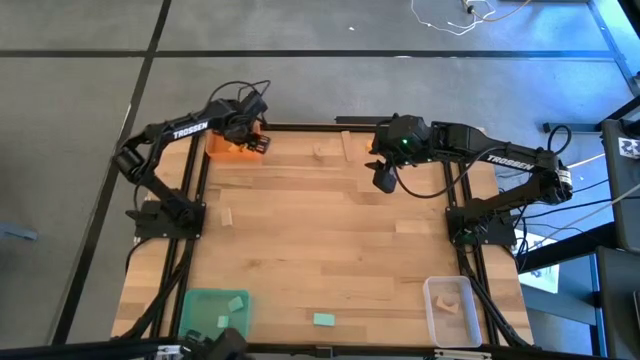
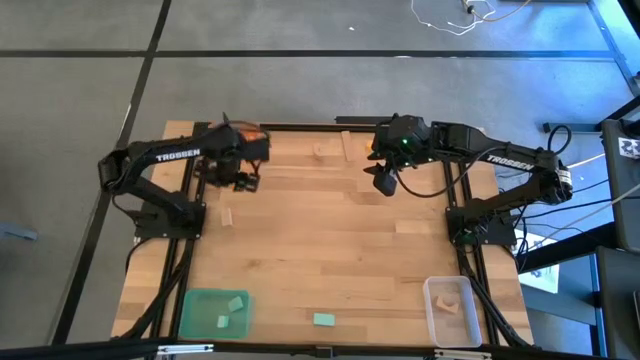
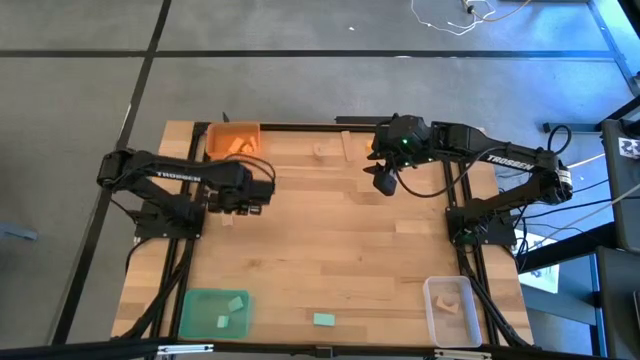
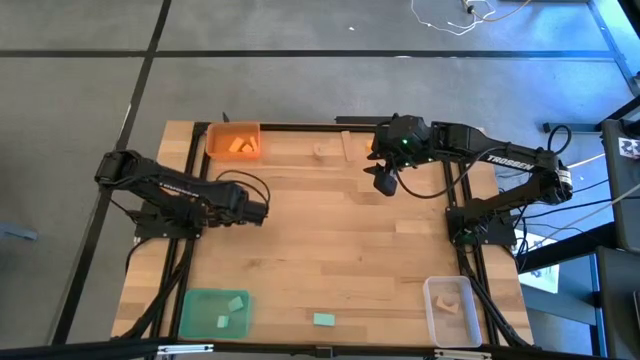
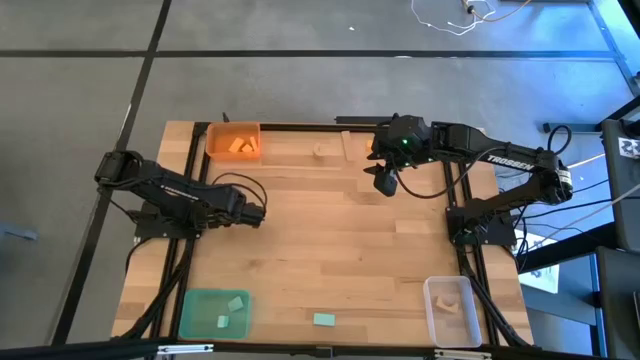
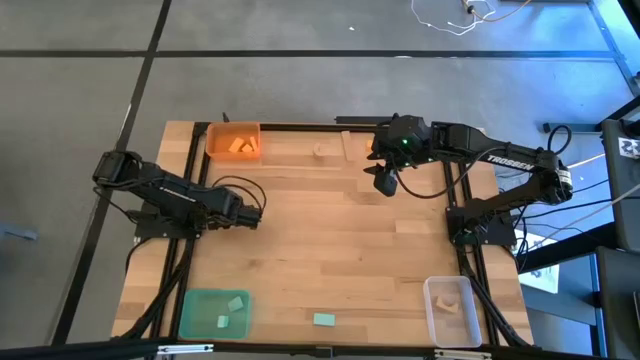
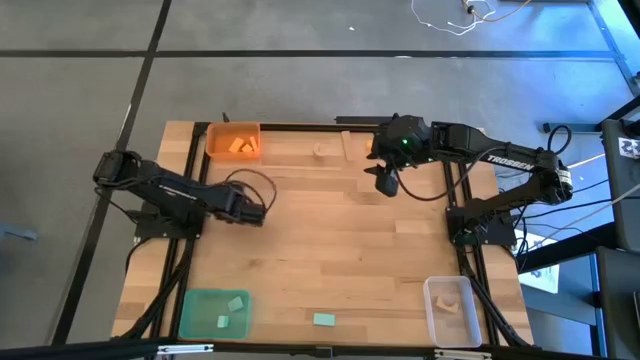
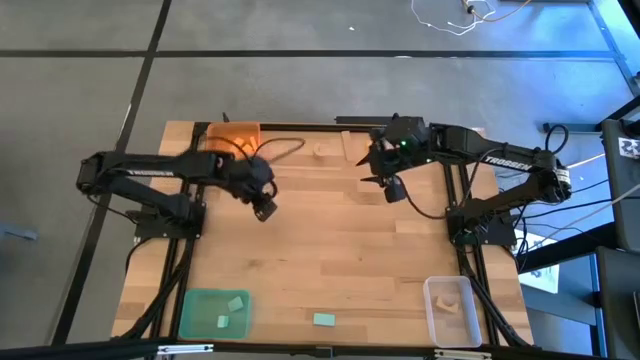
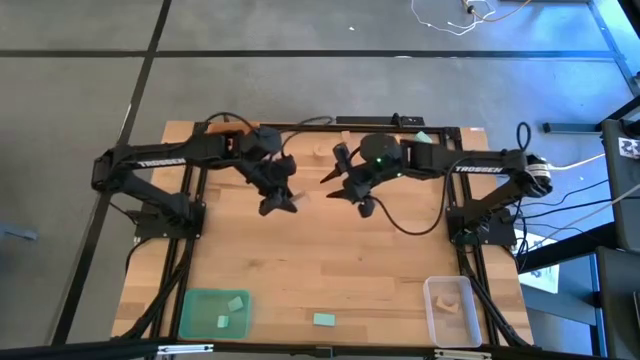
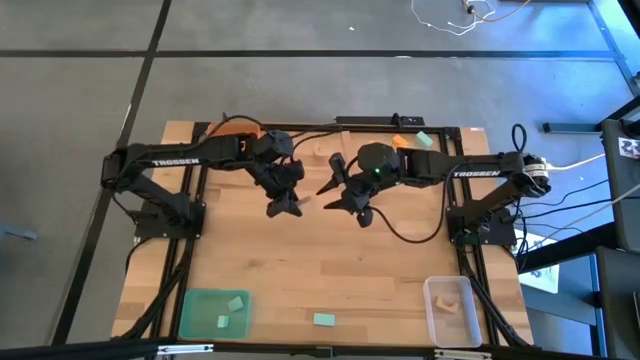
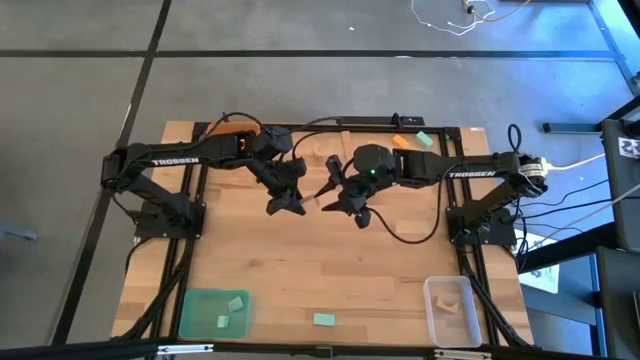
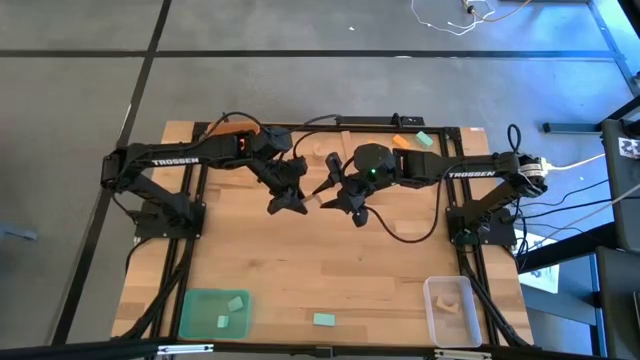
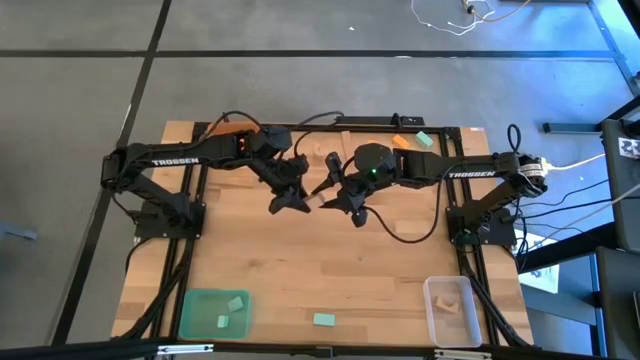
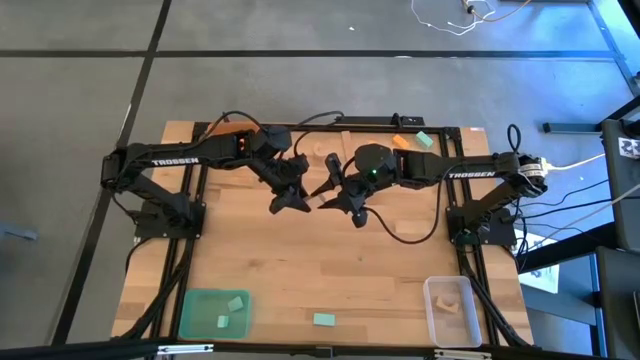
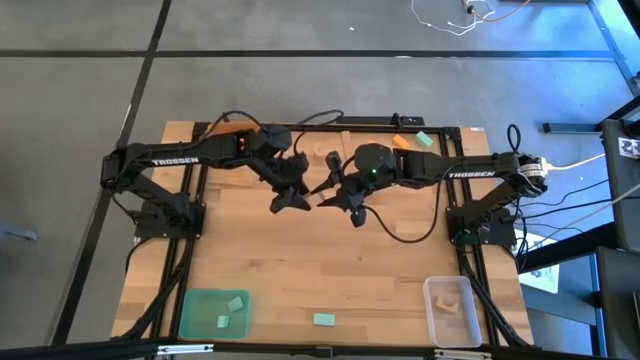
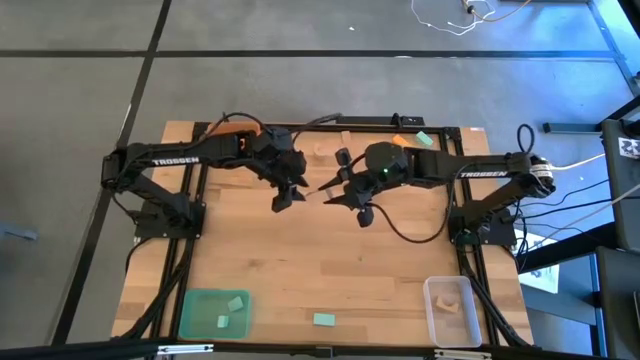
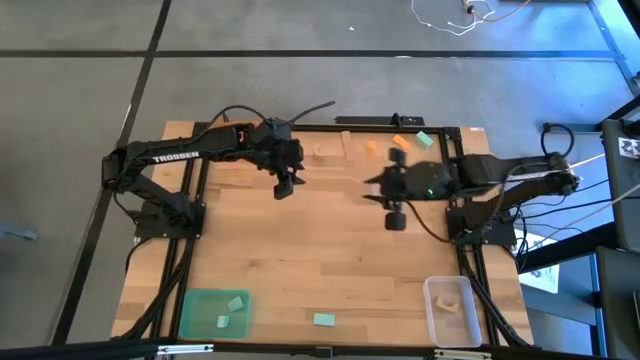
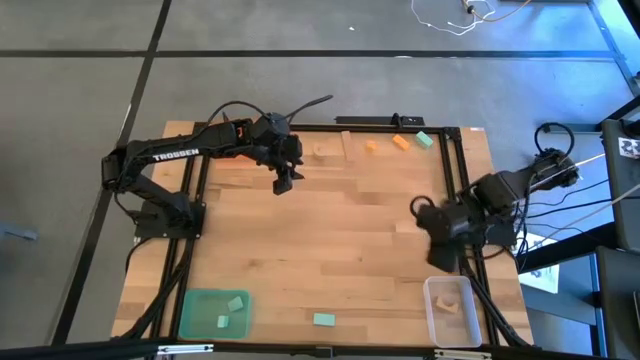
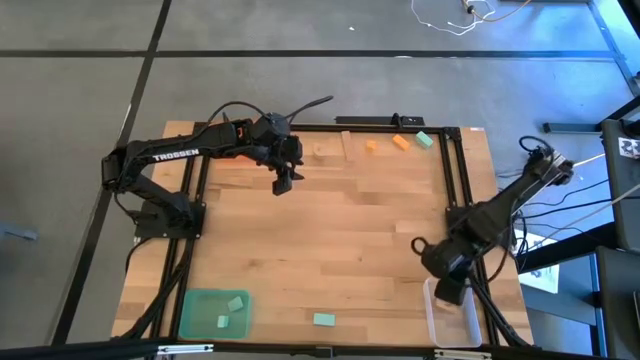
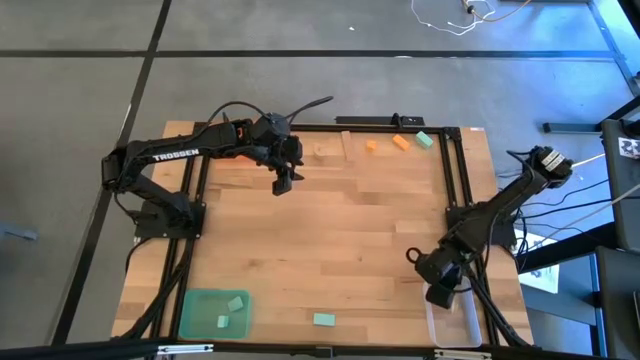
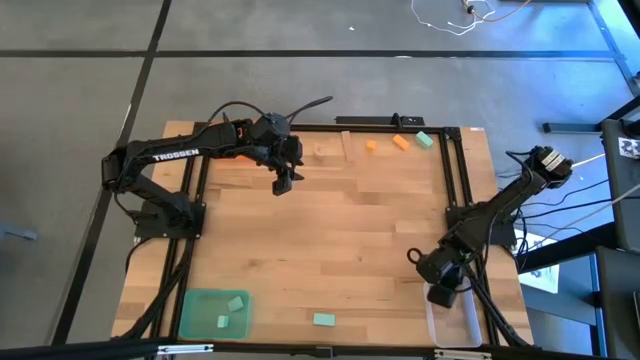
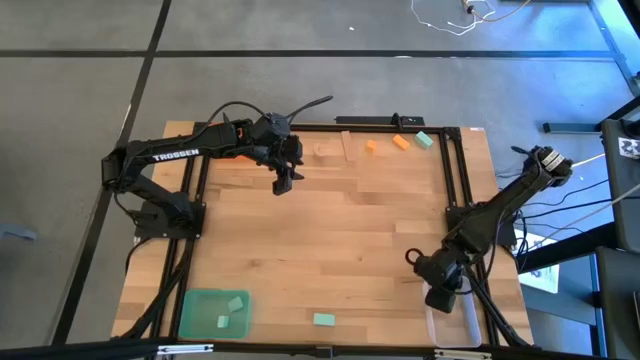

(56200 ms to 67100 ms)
Task: Sort & place blocks by color
Put the brown block into the transparent bin

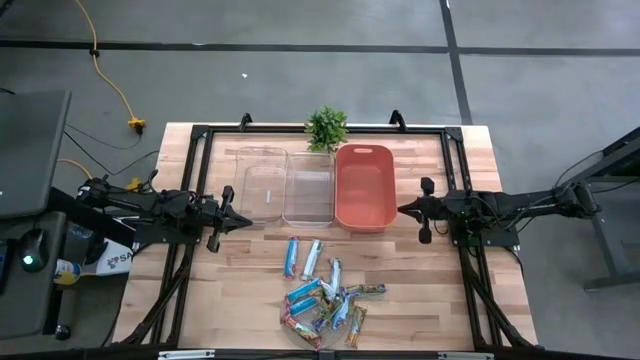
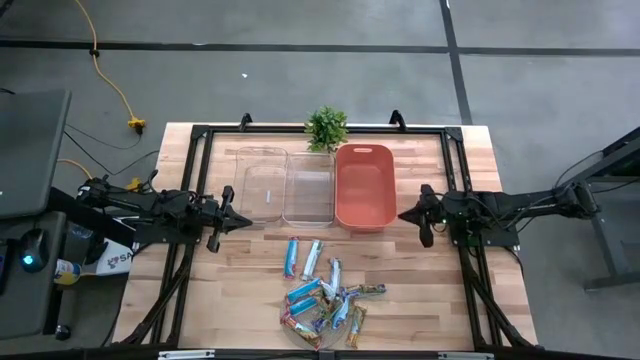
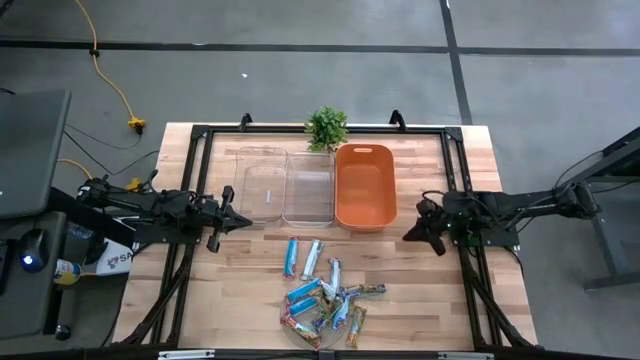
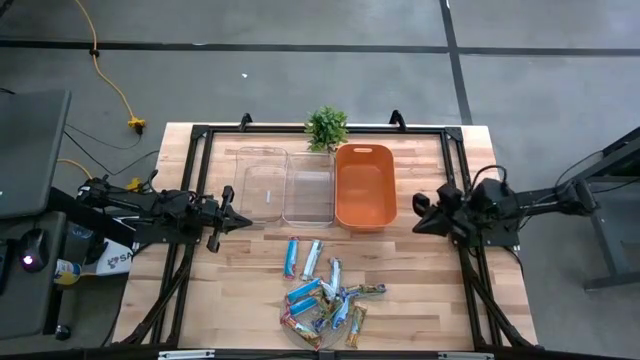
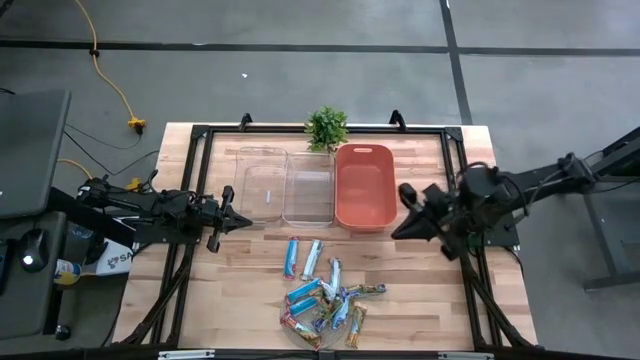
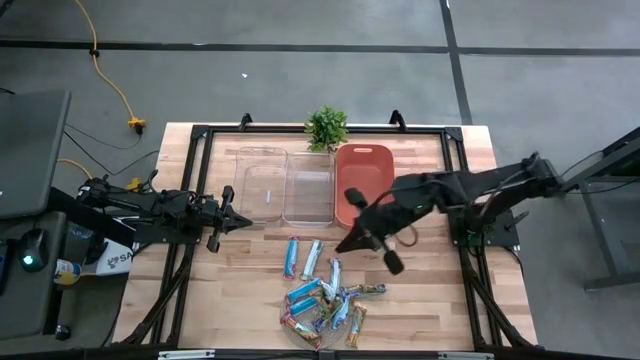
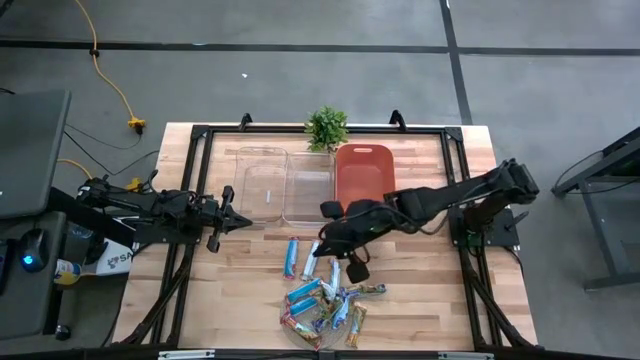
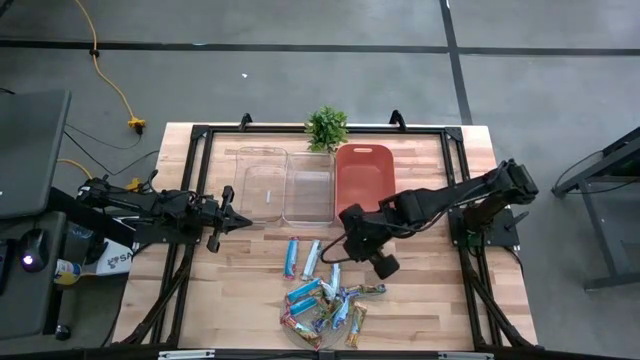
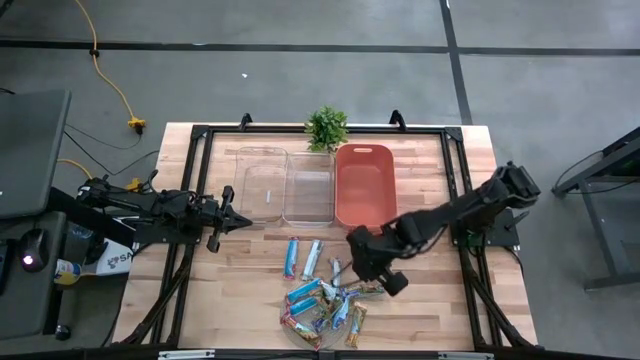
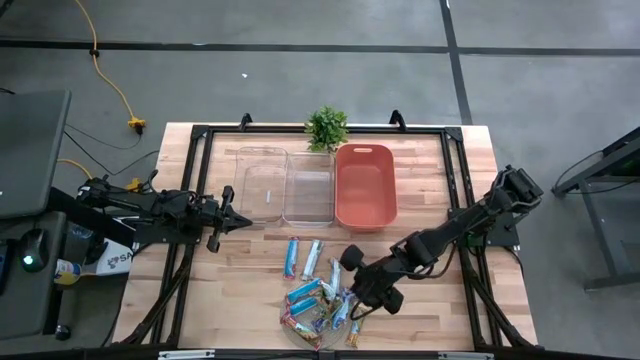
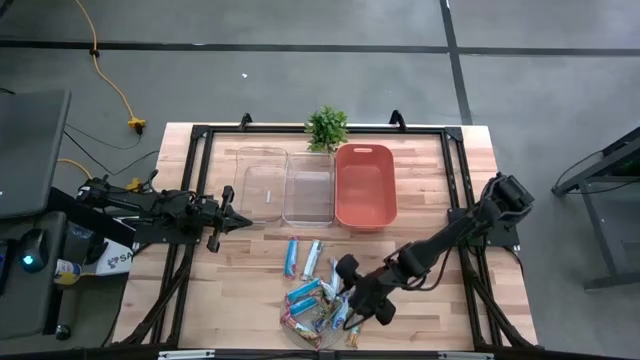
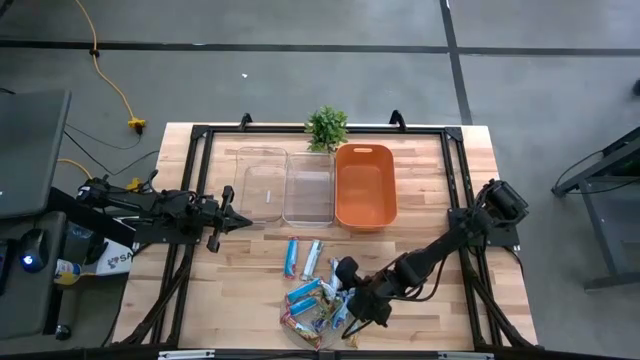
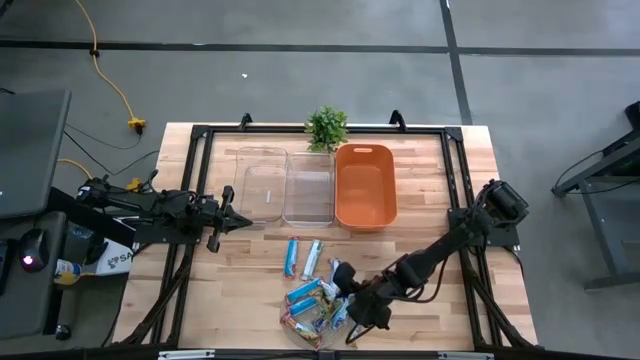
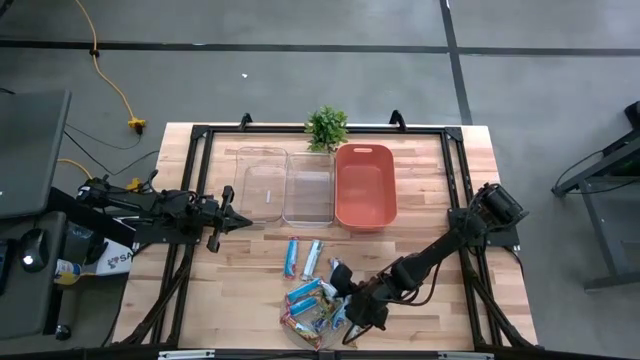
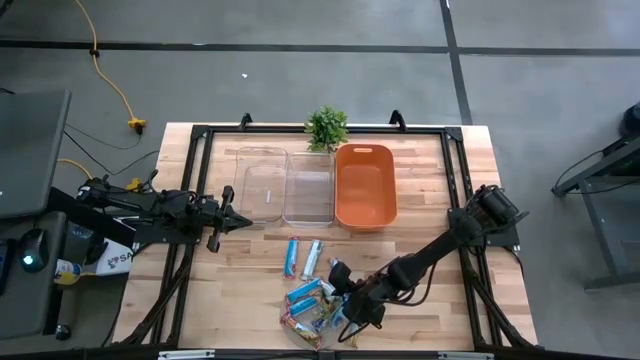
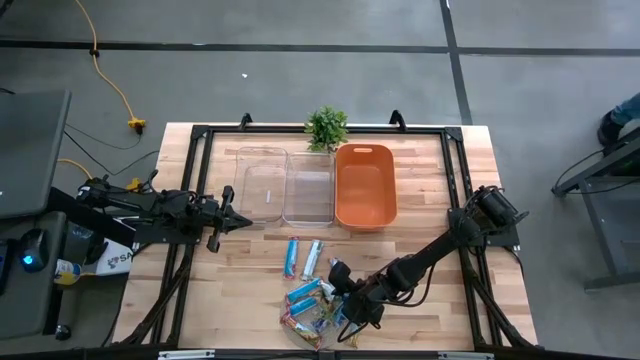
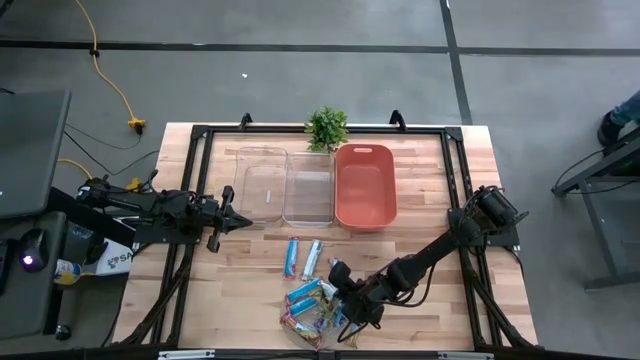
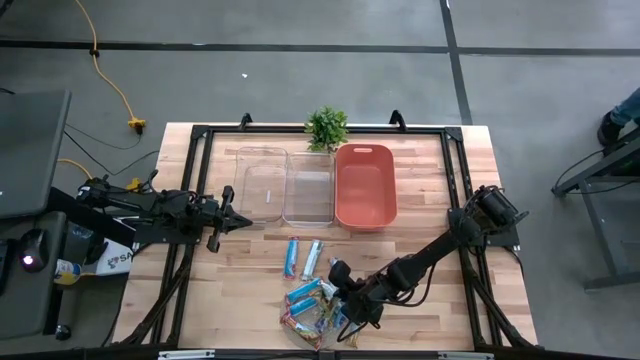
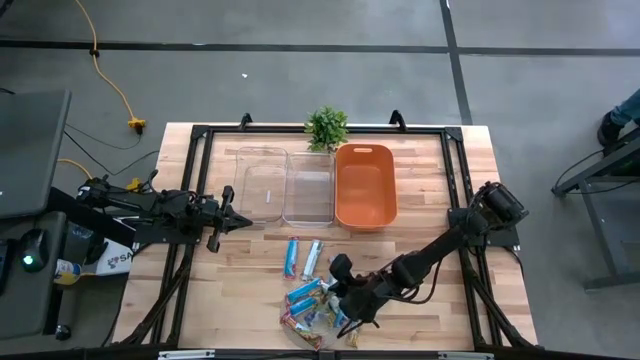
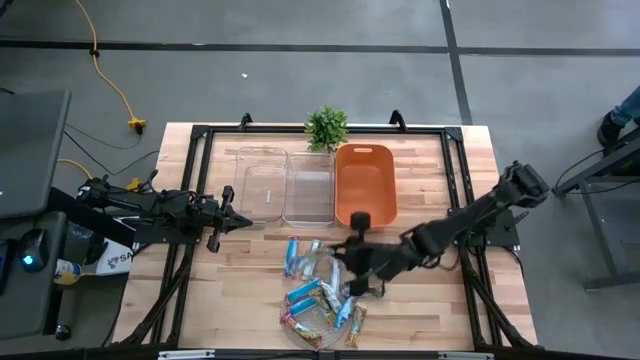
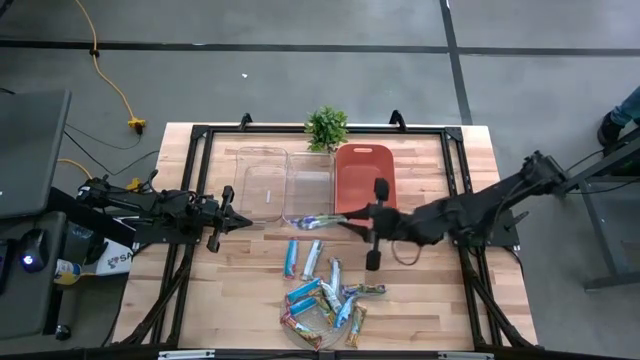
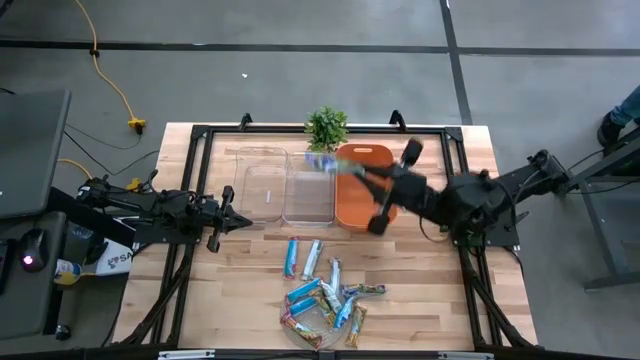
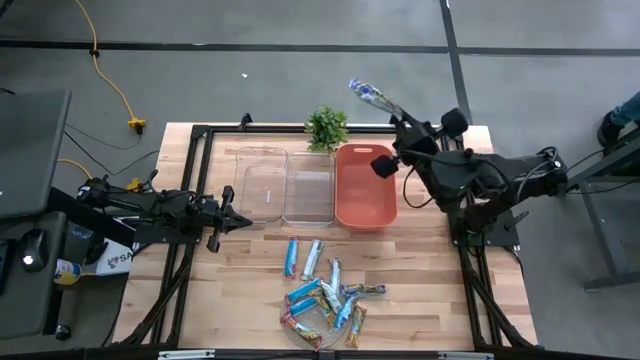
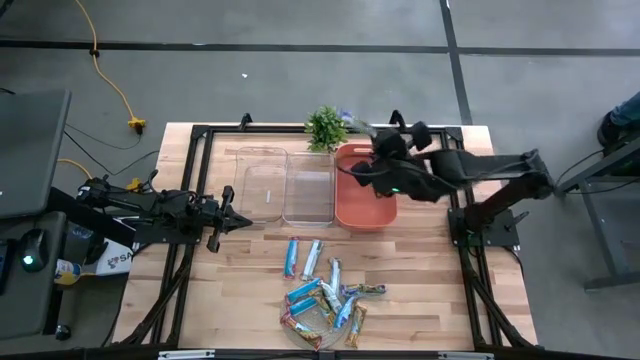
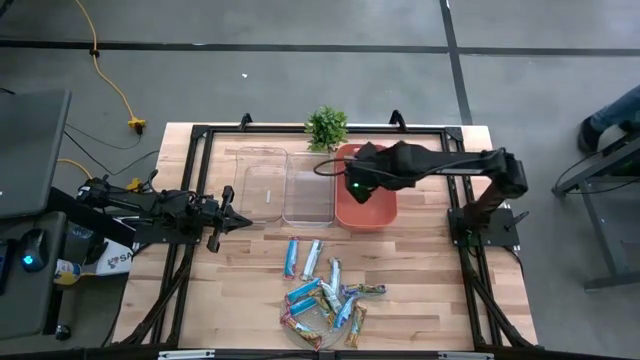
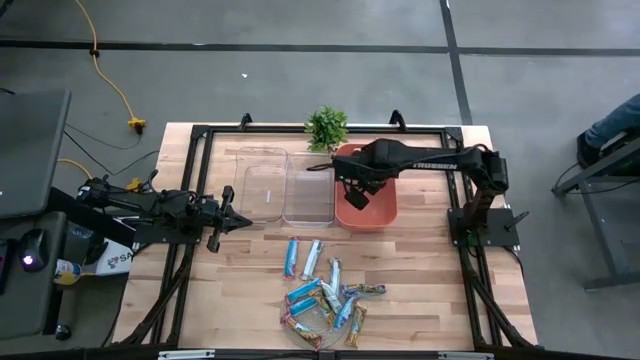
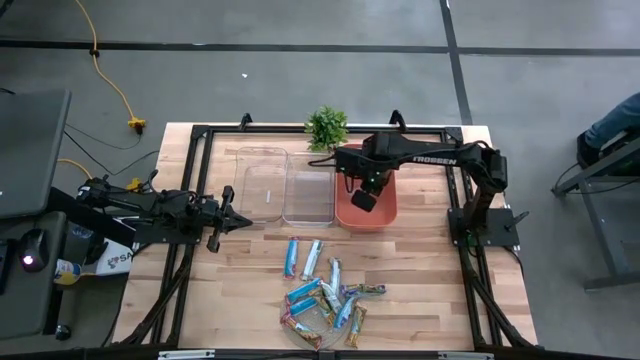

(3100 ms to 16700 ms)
Task: Pick and place Granola Bars by type
Put the right green granola bar into the orange bin
